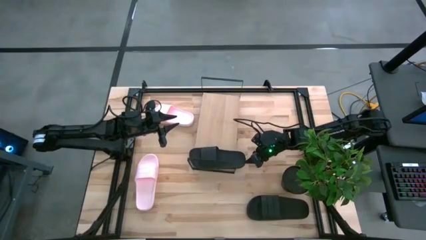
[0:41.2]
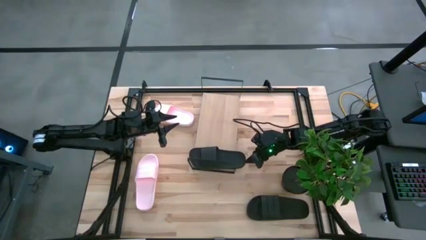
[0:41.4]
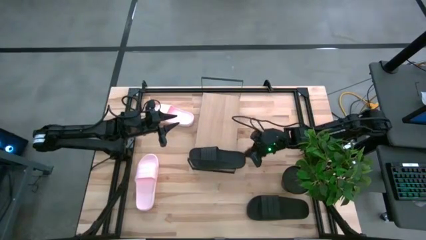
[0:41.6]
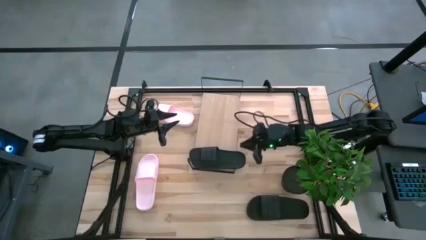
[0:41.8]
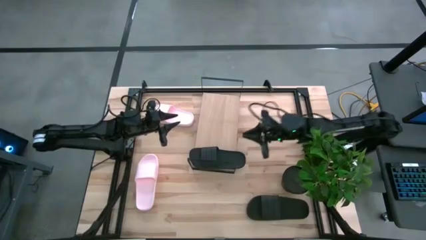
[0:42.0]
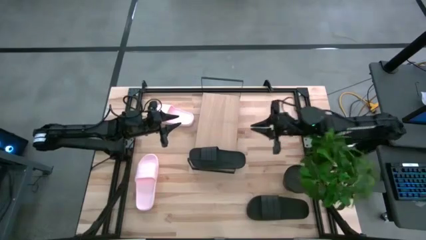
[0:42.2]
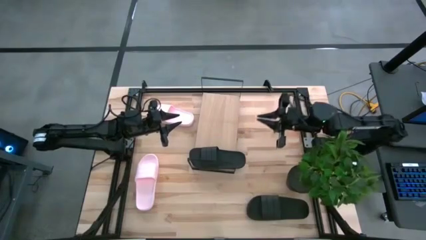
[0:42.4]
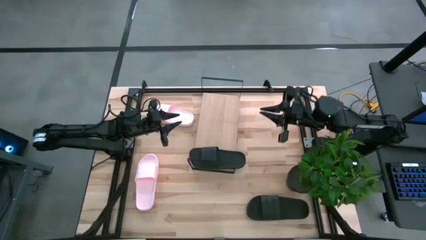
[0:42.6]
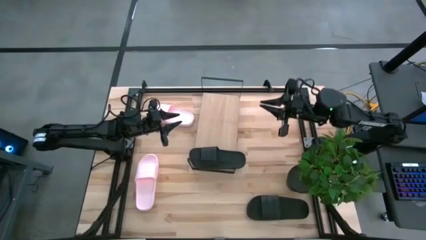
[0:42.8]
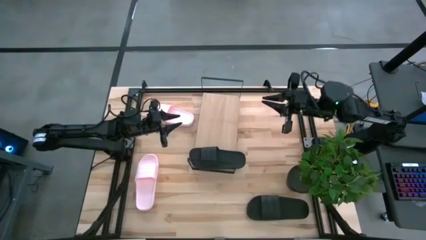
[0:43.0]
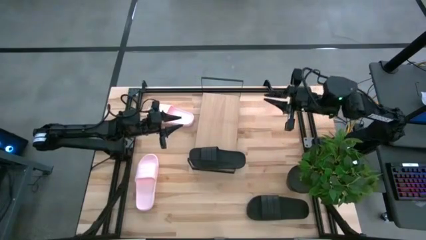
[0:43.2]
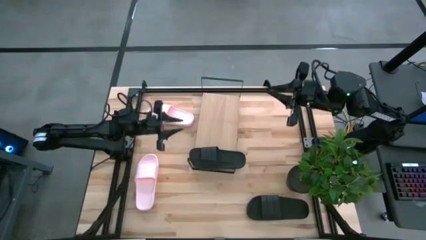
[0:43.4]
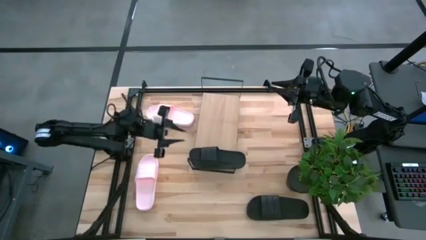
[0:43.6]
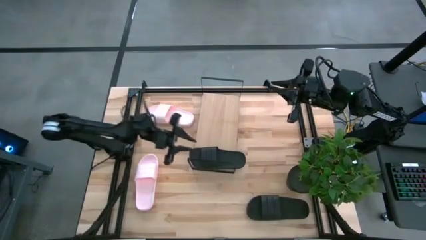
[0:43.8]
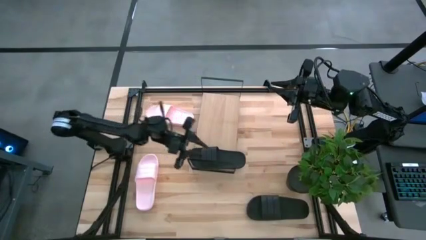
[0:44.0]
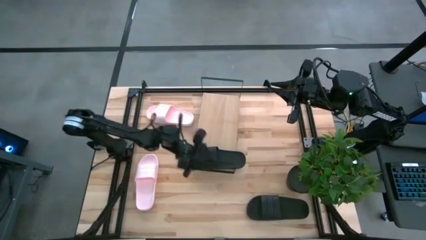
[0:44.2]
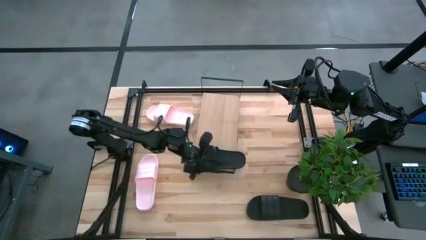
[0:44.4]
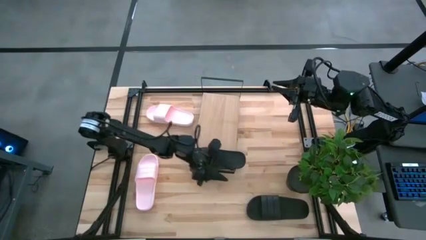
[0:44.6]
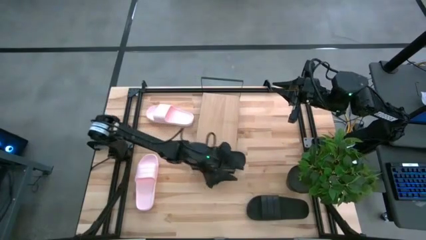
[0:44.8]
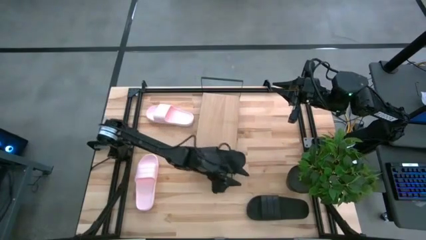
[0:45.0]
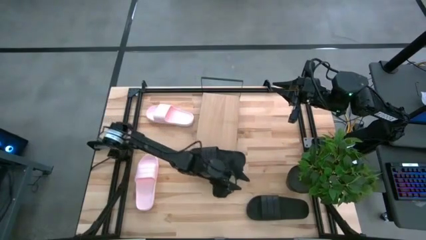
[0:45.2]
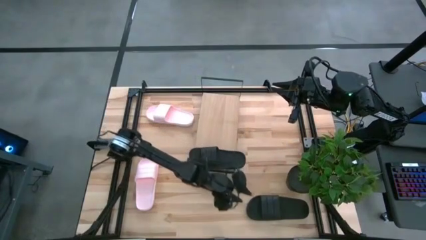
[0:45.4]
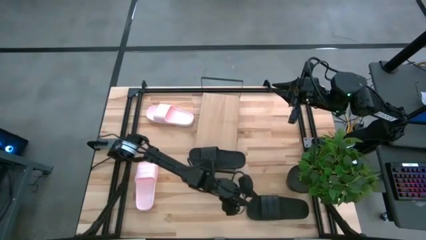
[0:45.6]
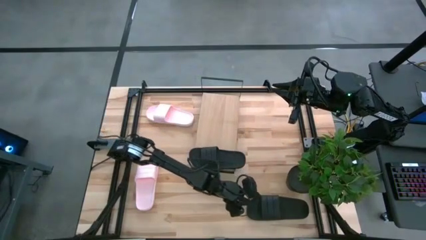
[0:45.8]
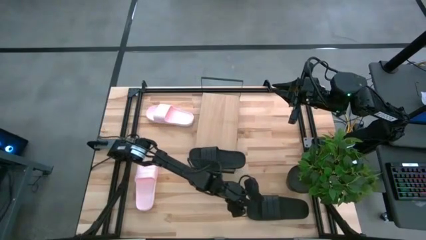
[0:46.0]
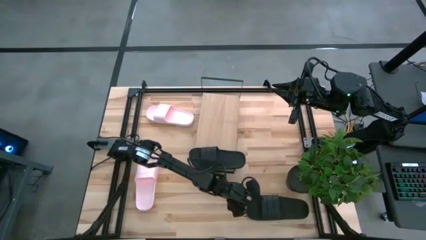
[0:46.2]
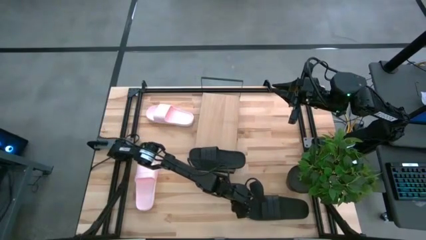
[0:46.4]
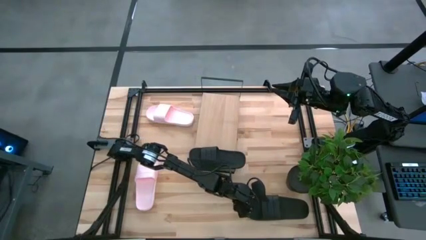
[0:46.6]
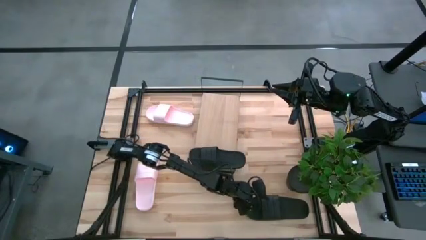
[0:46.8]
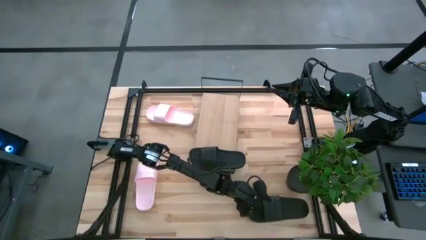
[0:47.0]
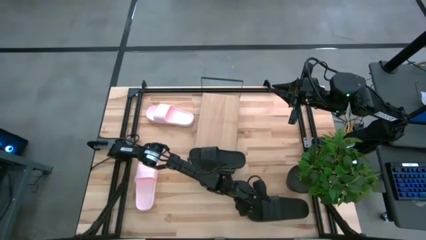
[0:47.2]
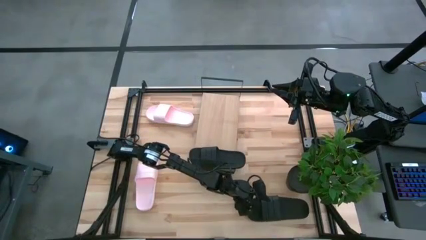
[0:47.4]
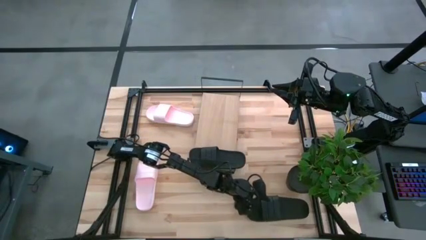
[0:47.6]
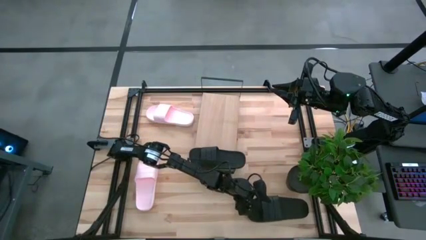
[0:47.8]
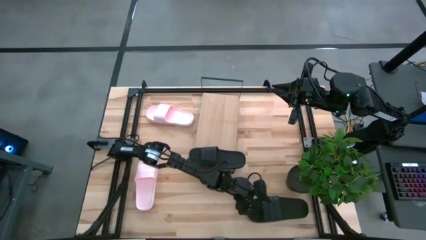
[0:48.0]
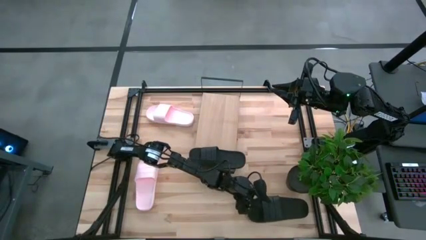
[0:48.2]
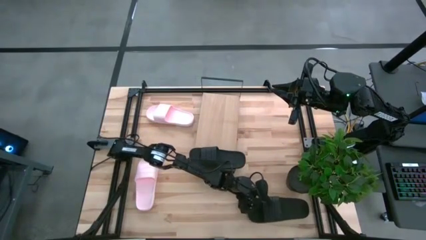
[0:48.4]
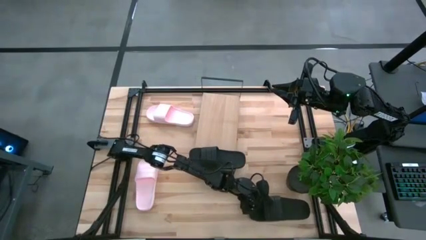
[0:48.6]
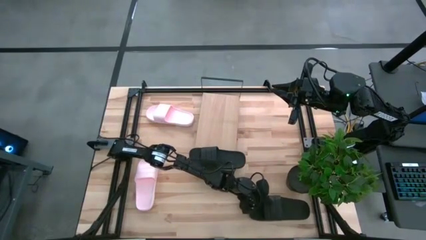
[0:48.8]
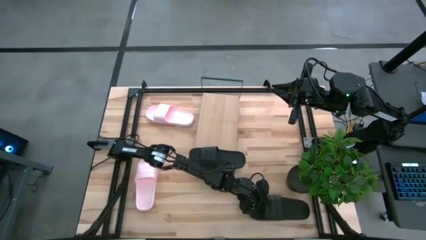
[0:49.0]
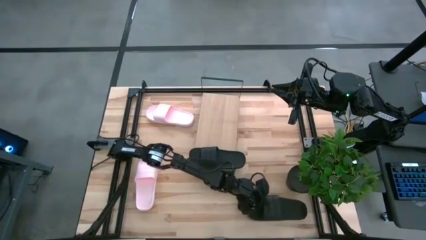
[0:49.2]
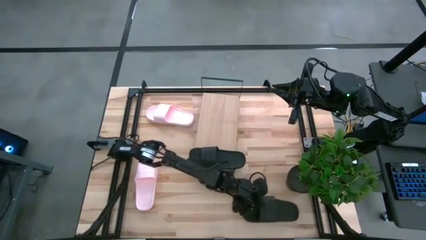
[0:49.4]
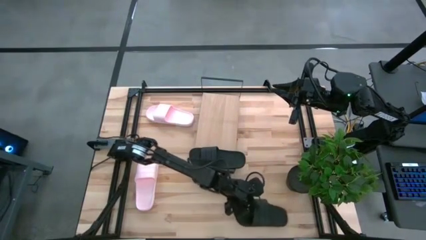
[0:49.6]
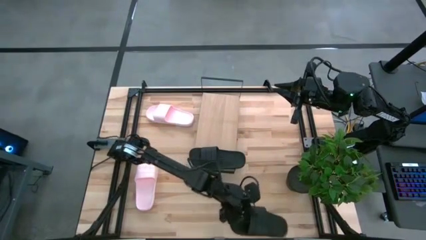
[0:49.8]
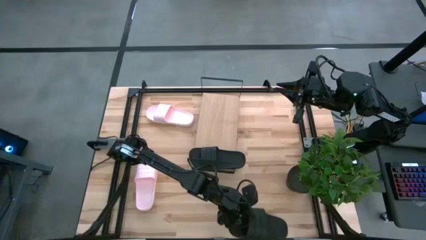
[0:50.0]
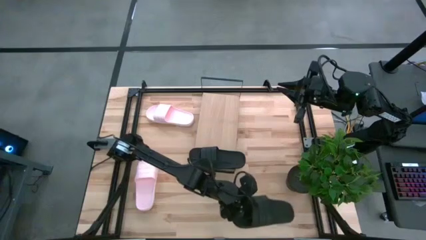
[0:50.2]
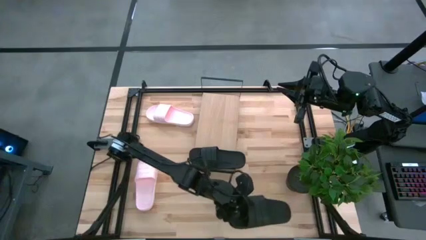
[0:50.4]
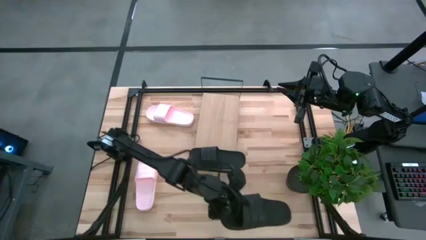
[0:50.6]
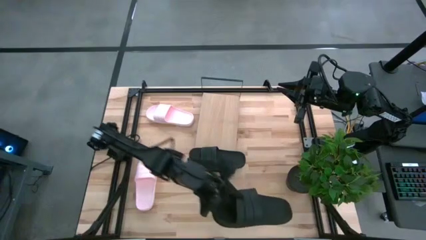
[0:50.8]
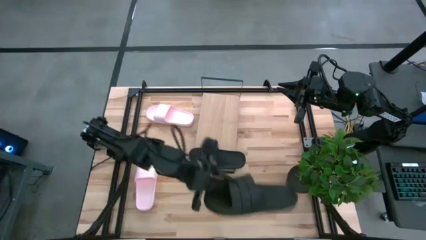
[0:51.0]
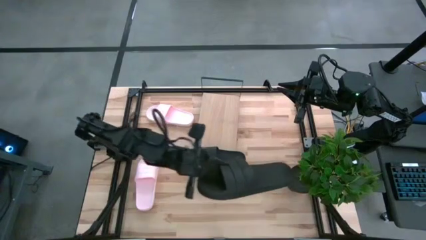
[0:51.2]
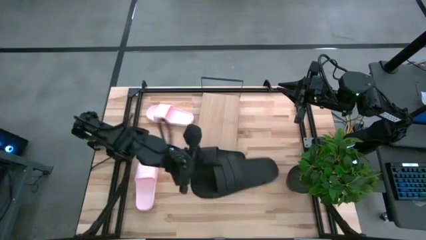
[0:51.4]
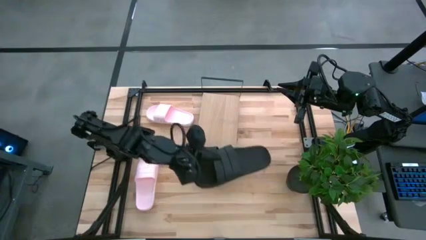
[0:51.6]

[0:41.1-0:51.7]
Task: Pick and place slides into the shelf
Put the black slides on the shelf
